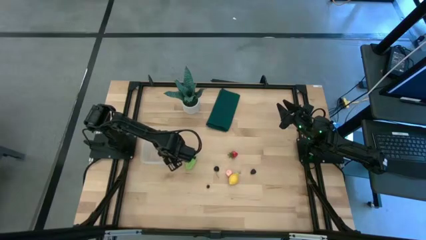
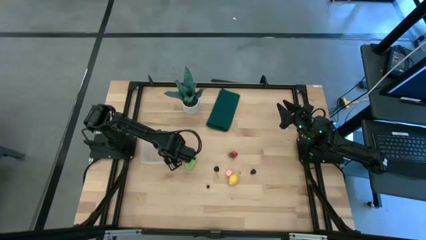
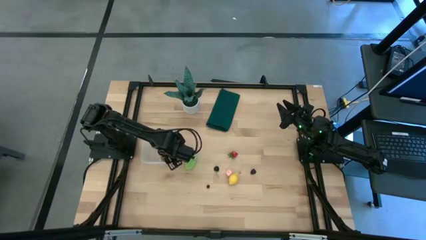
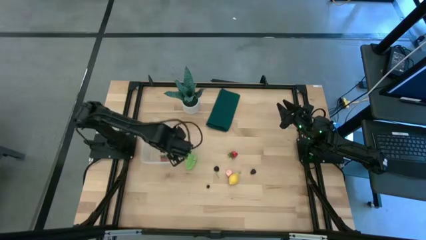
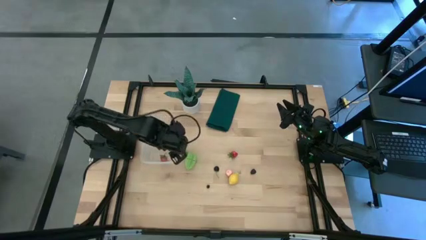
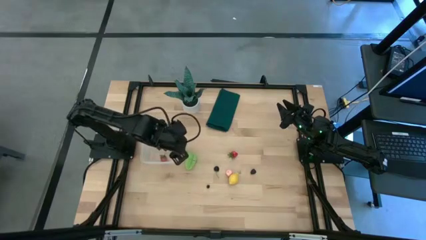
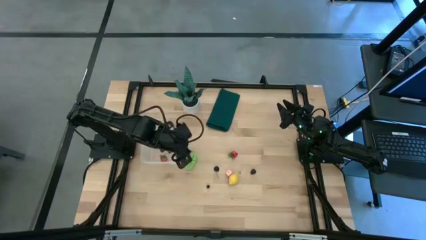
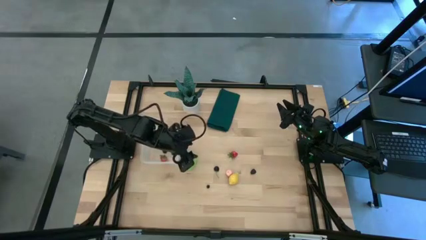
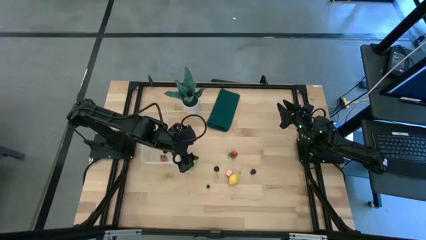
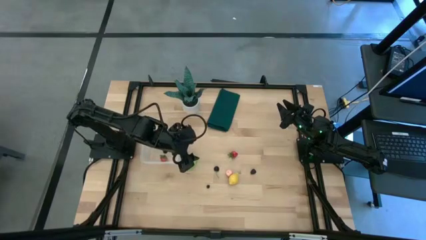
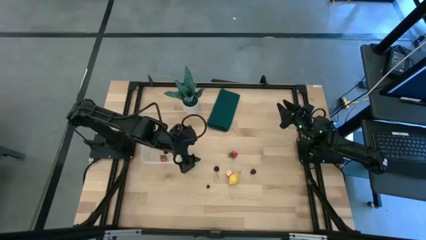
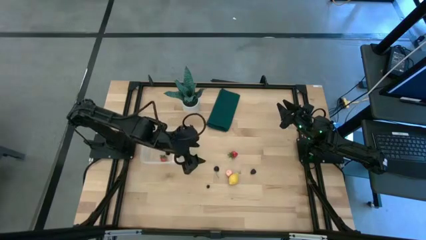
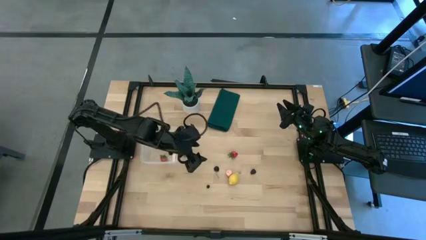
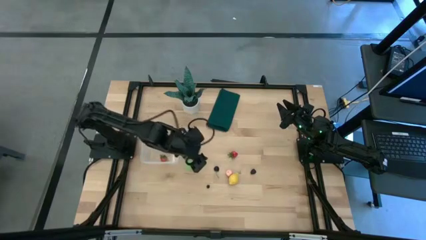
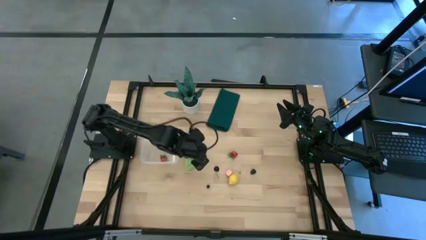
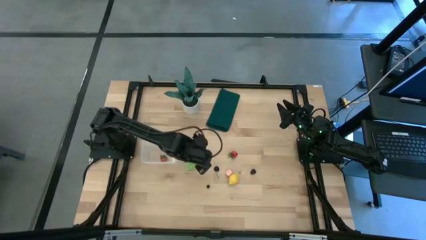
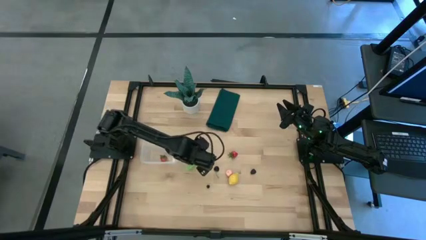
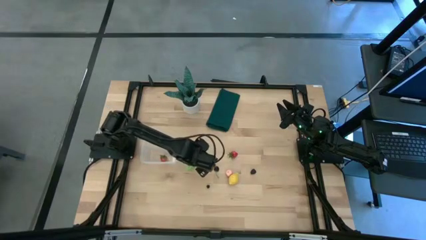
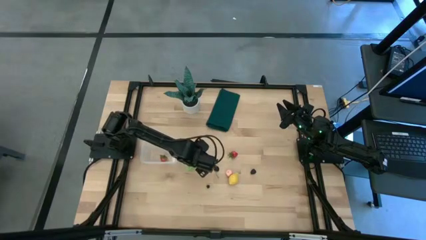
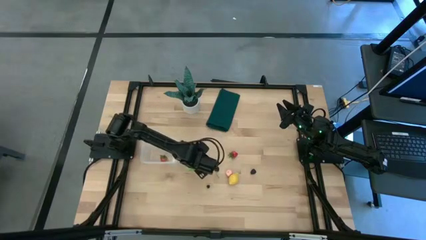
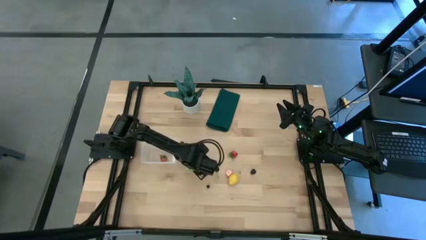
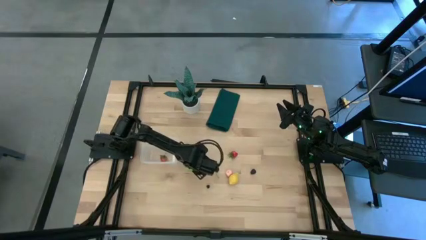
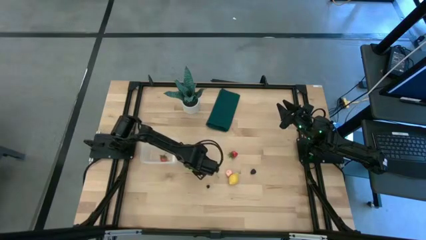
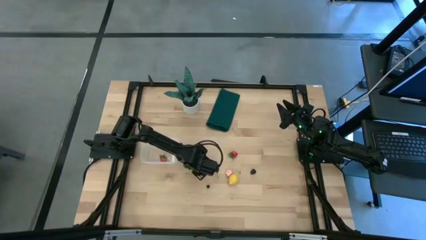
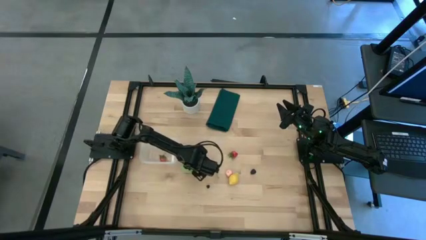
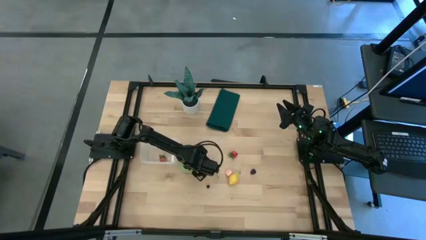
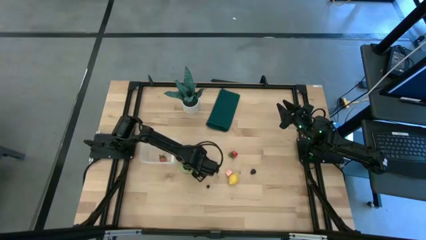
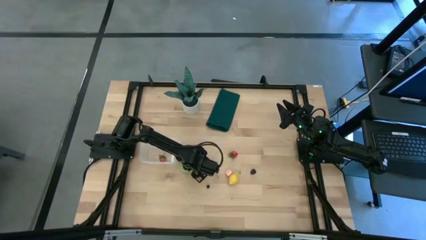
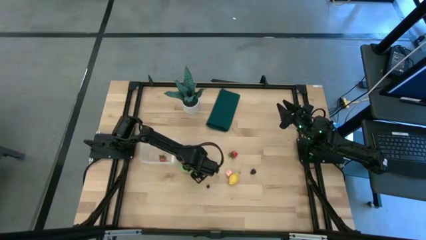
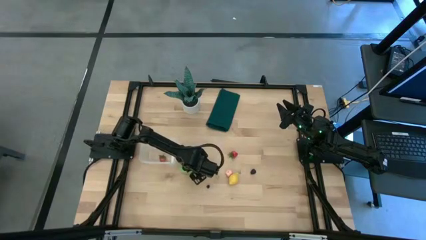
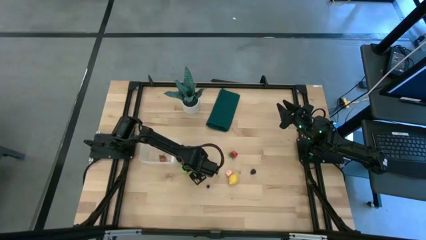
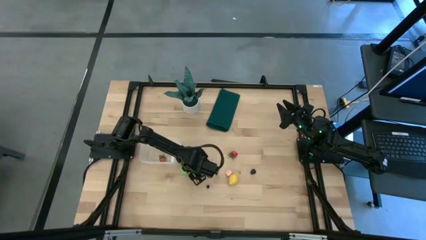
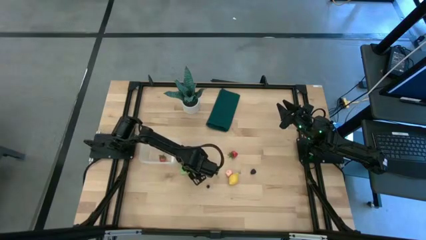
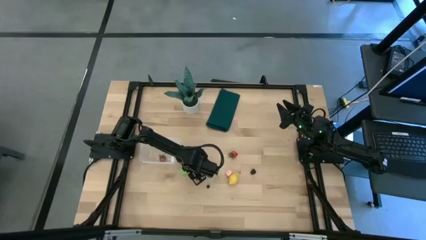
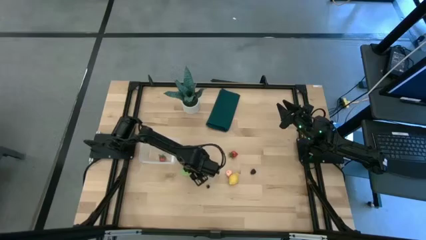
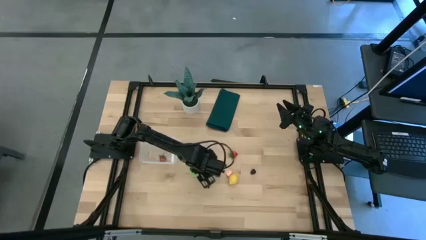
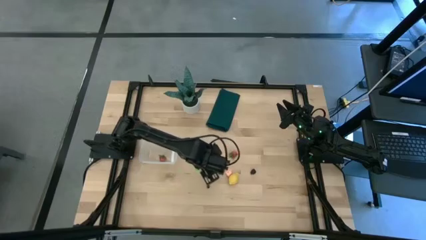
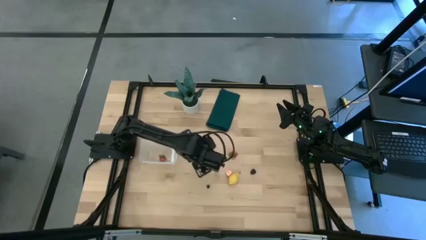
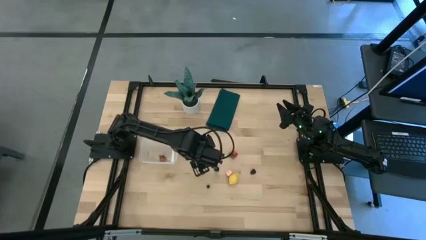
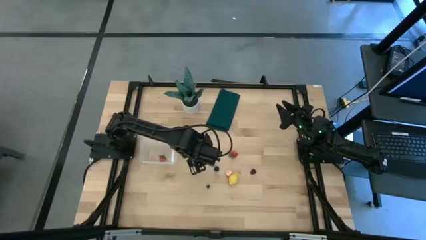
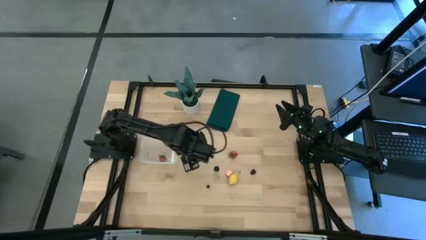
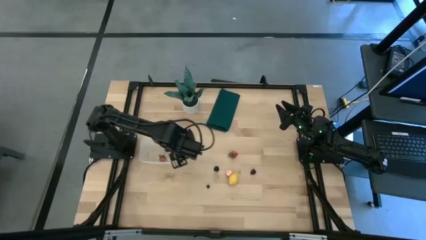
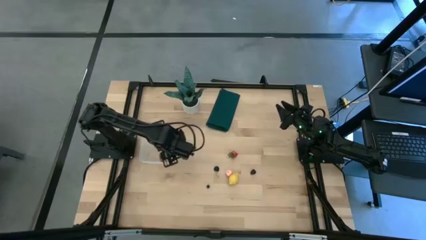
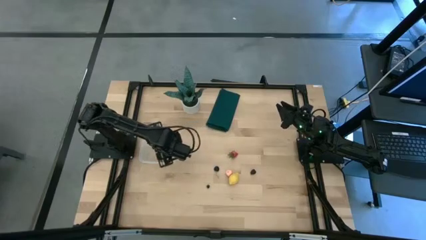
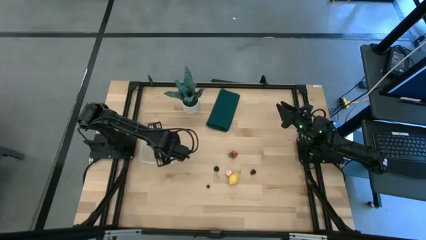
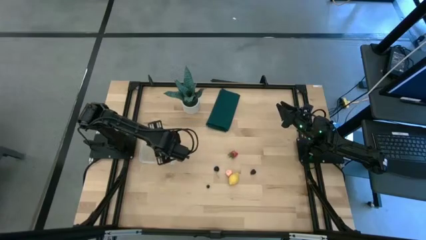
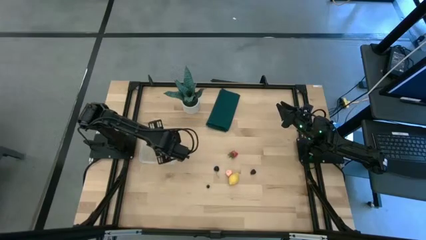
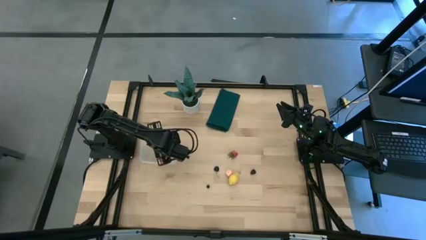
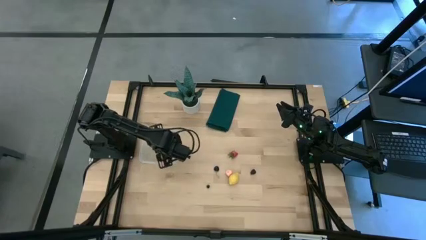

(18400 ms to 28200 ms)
Task: Pick and placing Produce into tupperware
Put the starfruit into the transparent bin

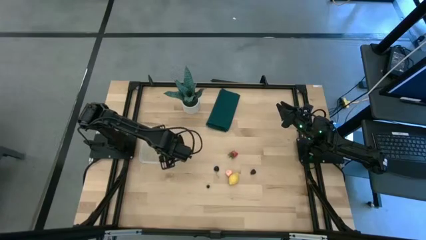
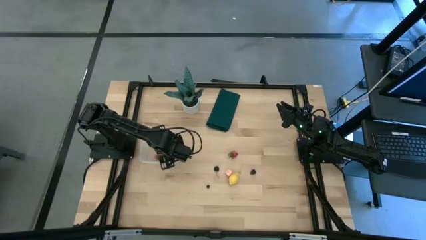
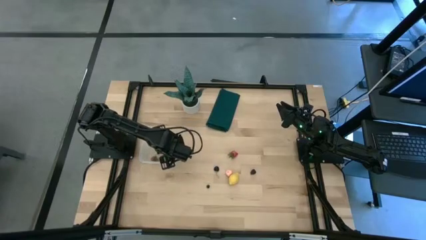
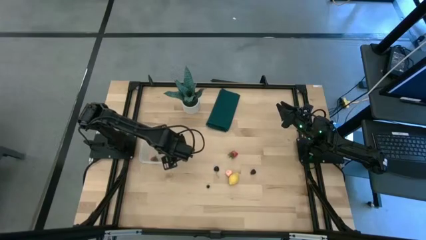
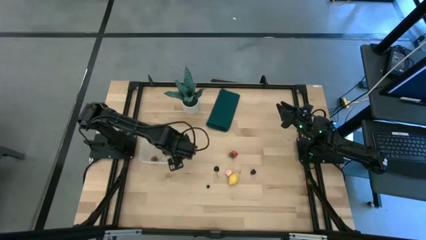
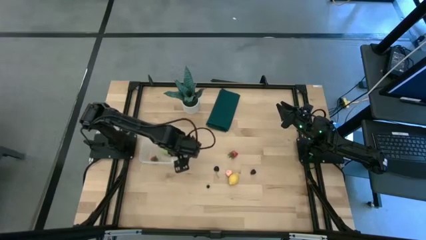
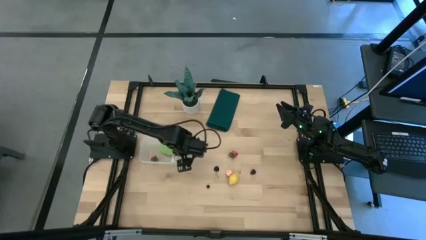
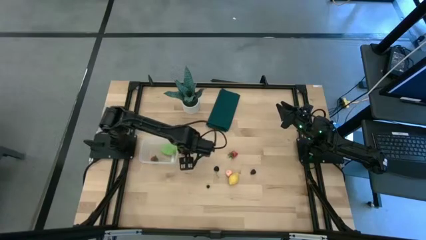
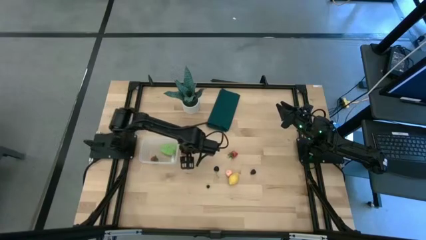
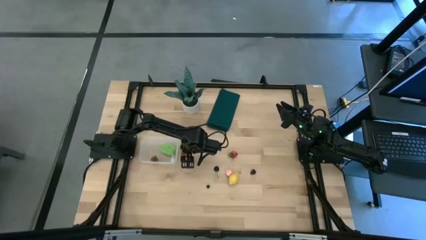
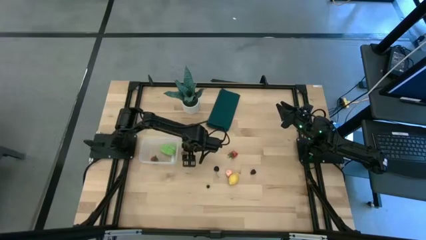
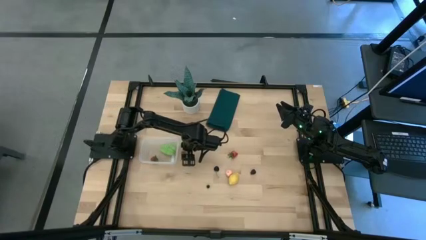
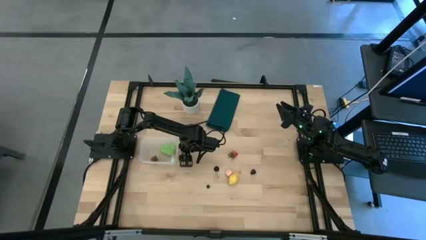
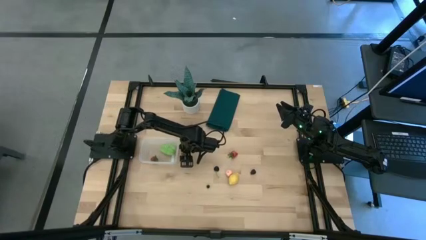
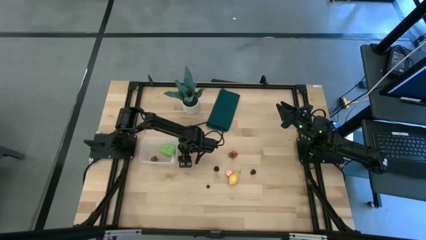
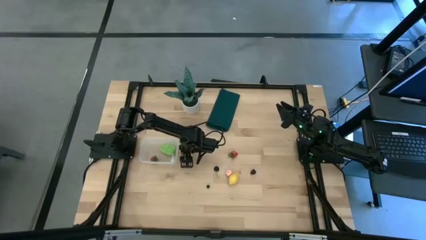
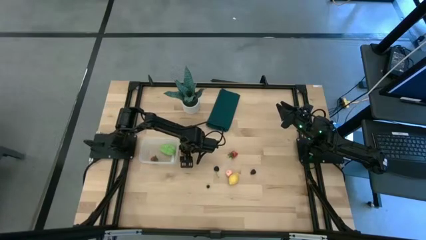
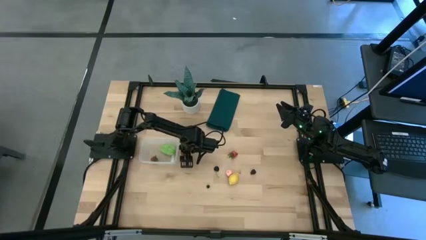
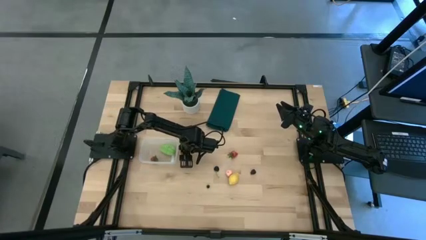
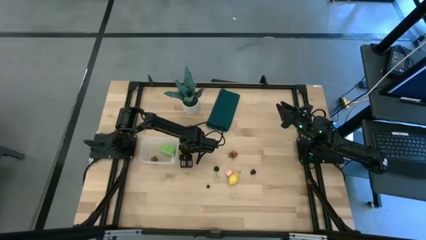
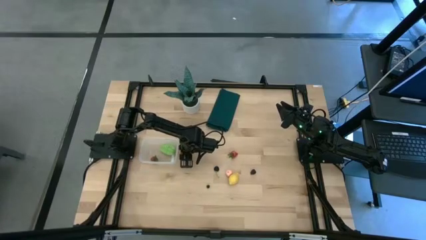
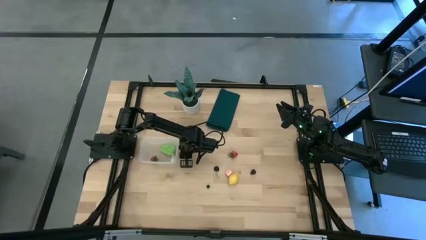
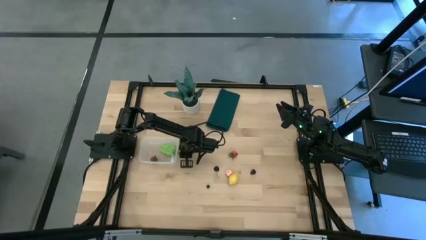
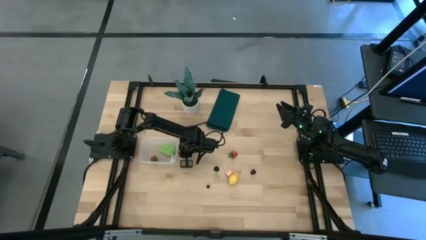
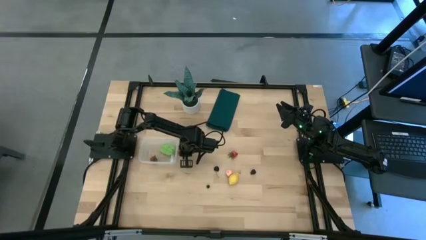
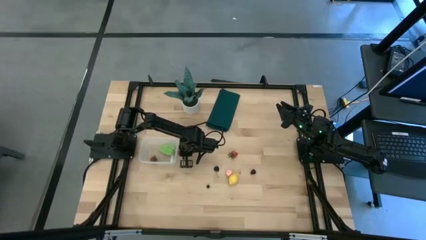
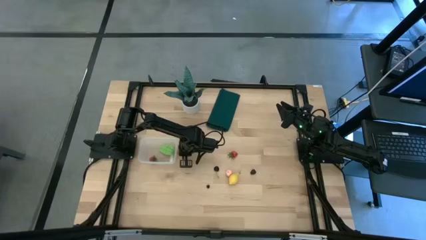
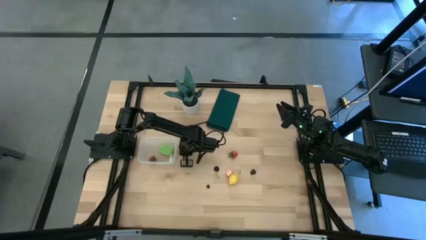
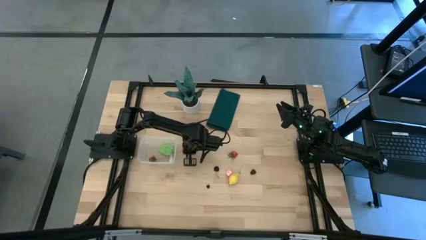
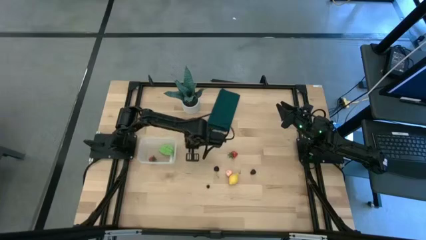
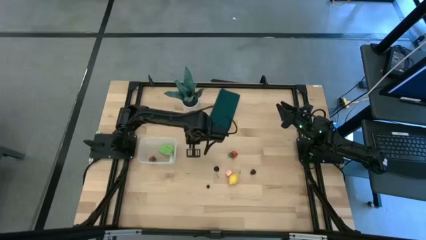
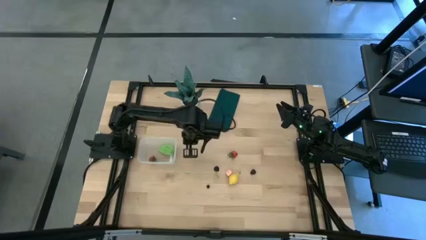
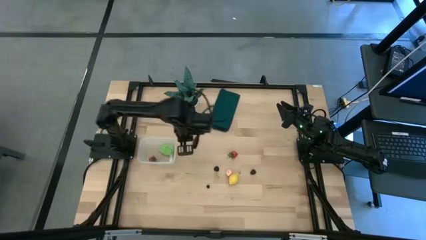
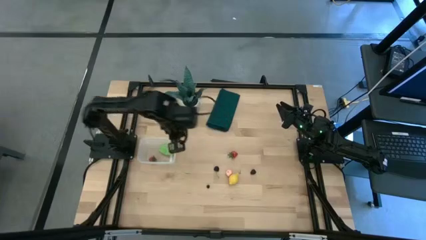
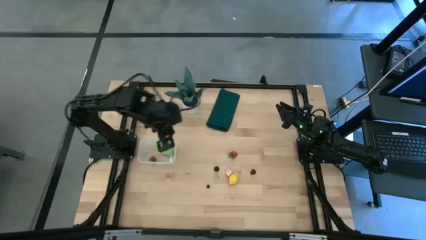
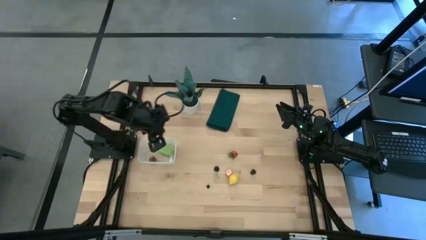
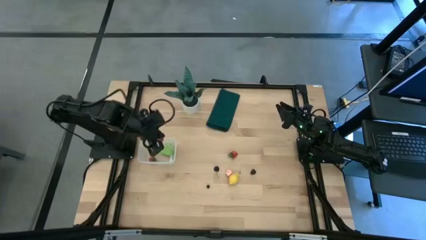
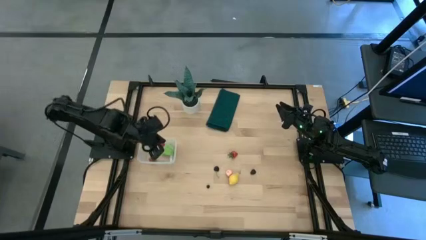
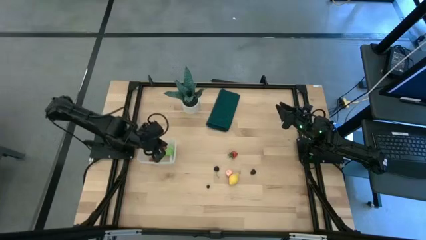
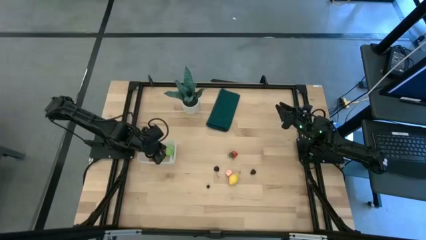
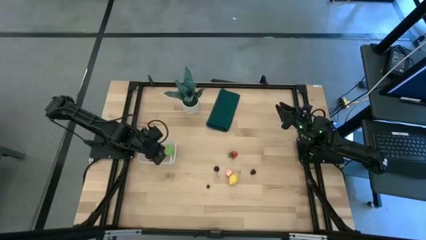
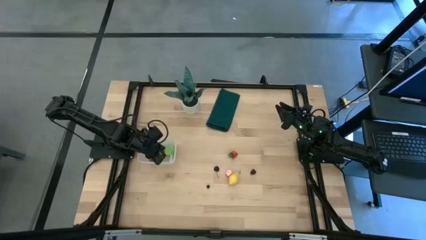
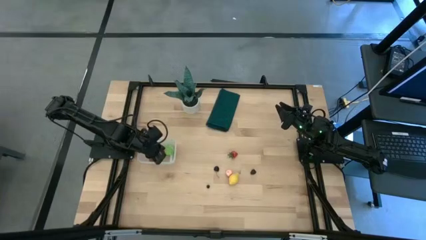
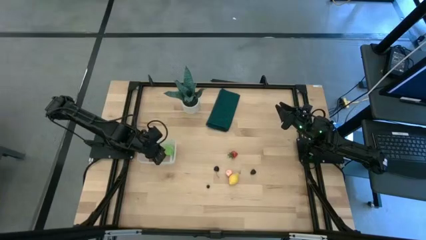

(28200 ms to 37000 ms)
Put the left strawberry into the transparent bin
